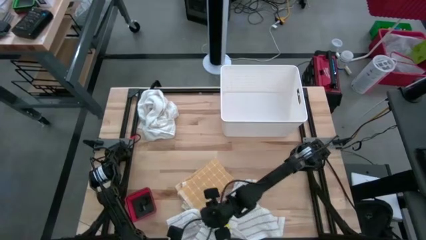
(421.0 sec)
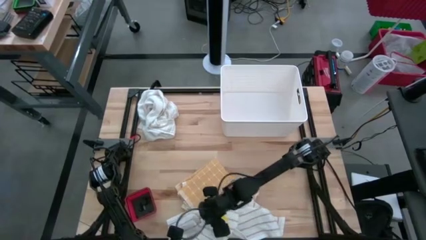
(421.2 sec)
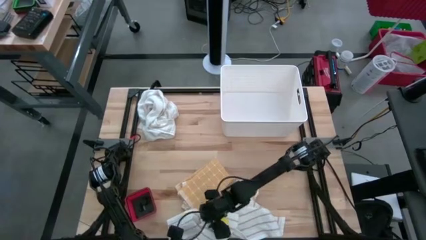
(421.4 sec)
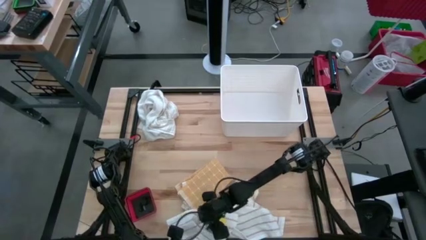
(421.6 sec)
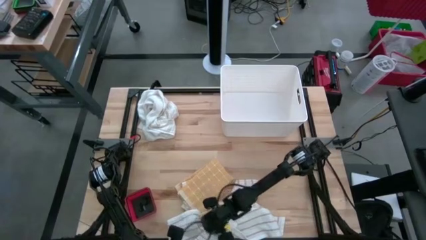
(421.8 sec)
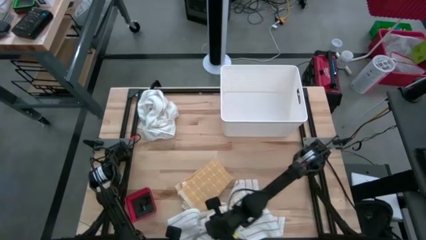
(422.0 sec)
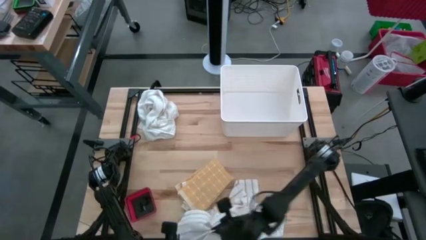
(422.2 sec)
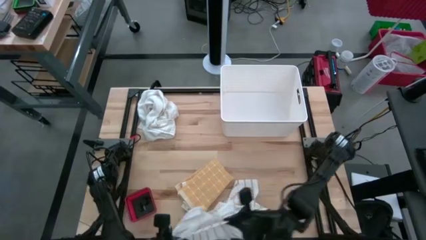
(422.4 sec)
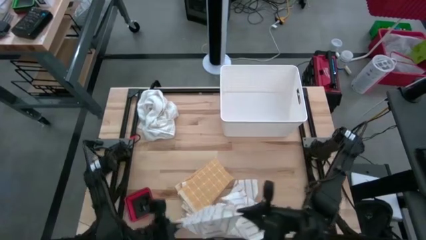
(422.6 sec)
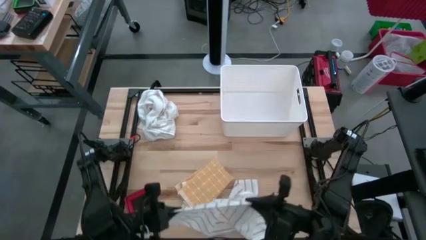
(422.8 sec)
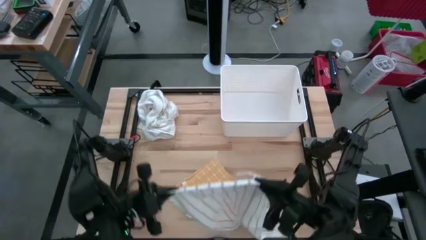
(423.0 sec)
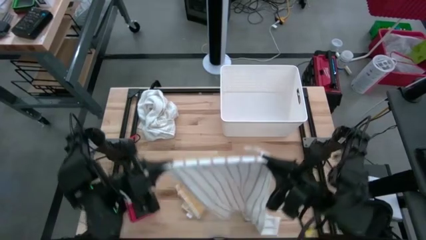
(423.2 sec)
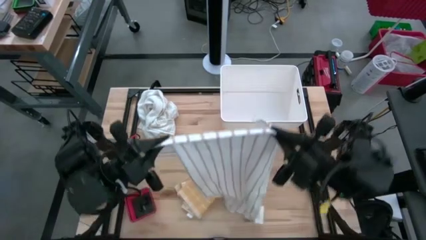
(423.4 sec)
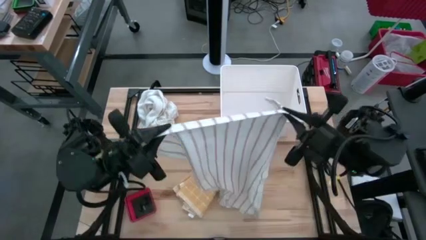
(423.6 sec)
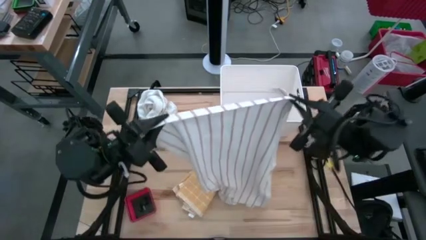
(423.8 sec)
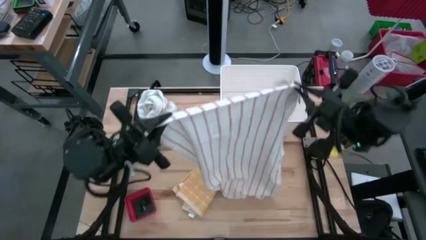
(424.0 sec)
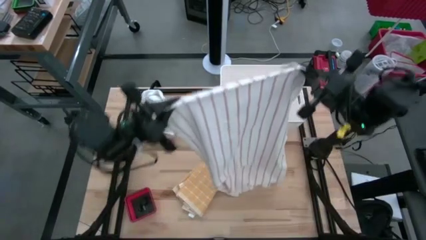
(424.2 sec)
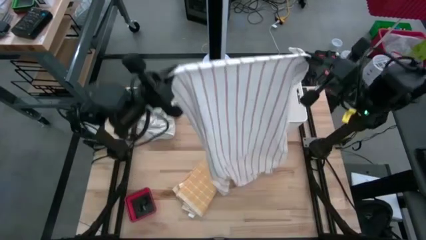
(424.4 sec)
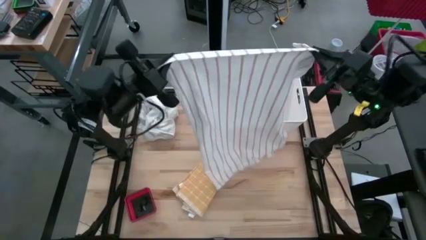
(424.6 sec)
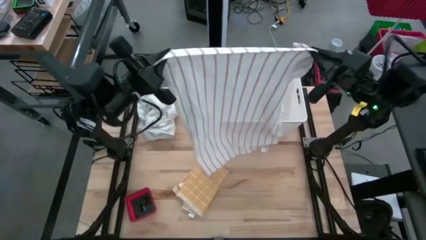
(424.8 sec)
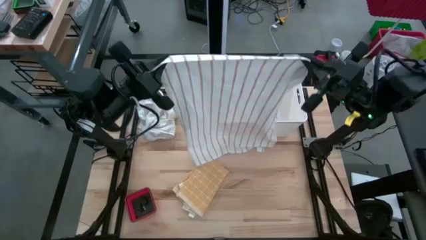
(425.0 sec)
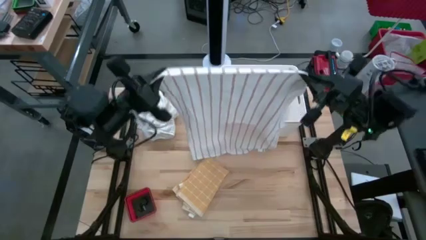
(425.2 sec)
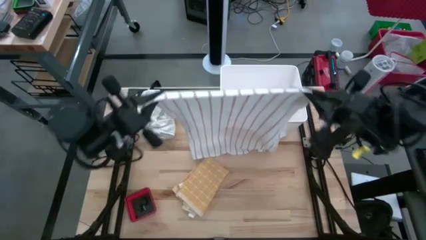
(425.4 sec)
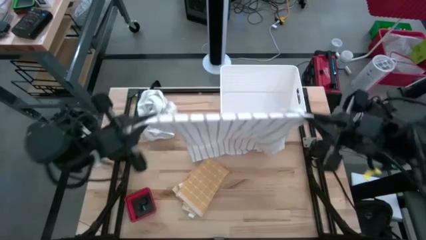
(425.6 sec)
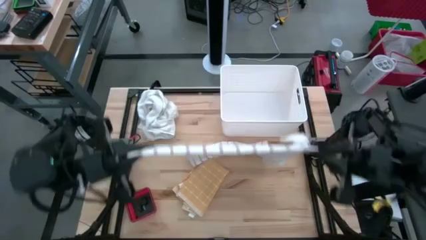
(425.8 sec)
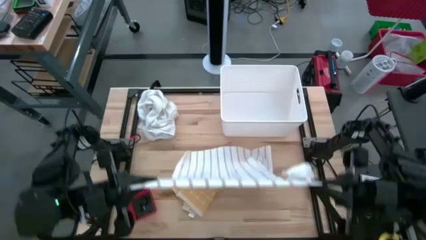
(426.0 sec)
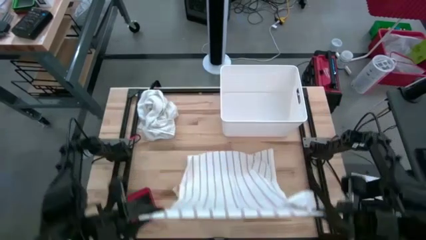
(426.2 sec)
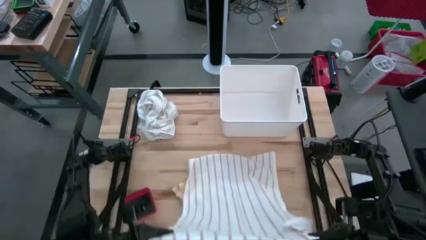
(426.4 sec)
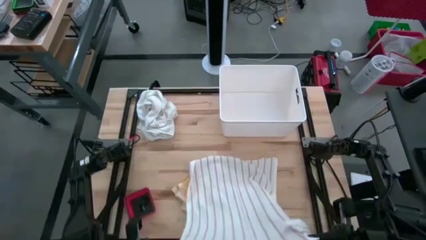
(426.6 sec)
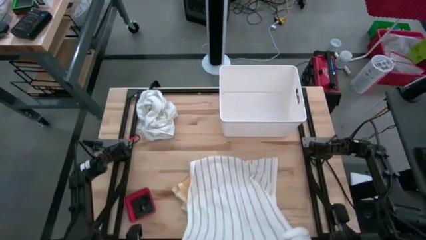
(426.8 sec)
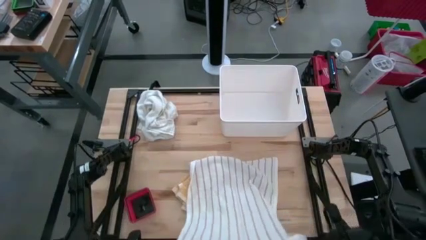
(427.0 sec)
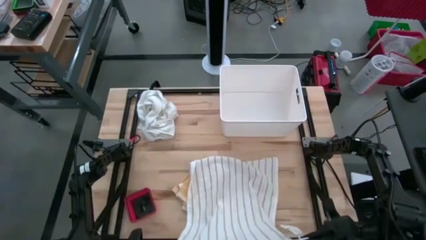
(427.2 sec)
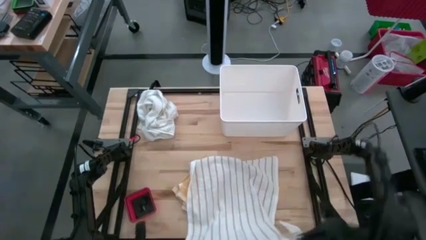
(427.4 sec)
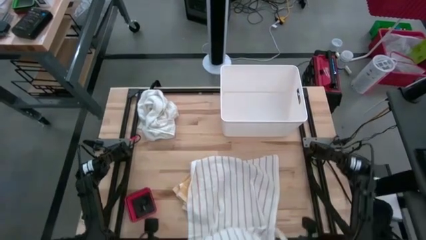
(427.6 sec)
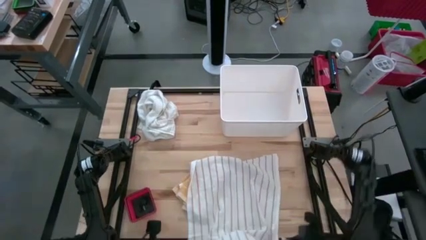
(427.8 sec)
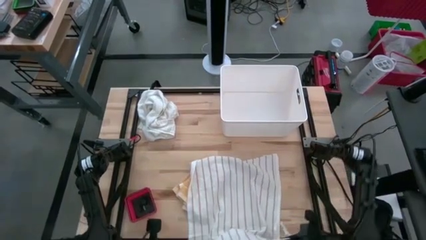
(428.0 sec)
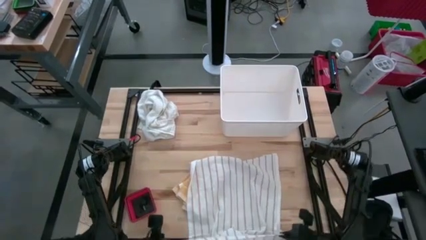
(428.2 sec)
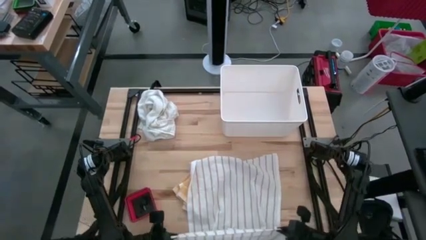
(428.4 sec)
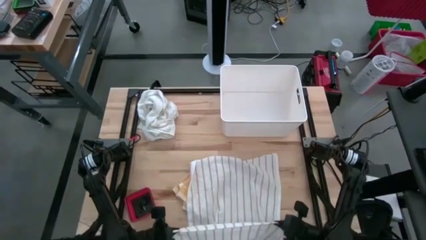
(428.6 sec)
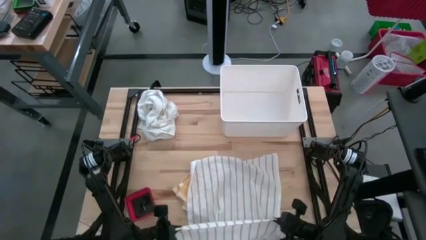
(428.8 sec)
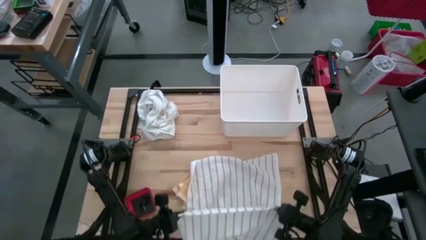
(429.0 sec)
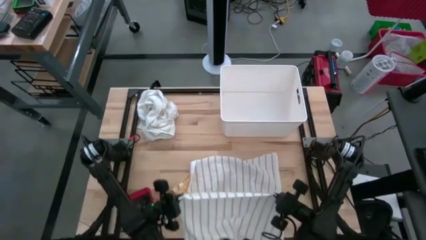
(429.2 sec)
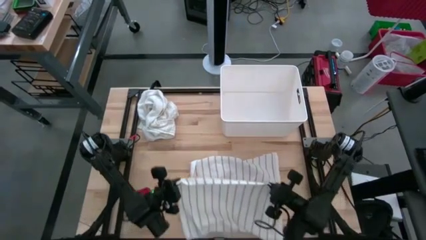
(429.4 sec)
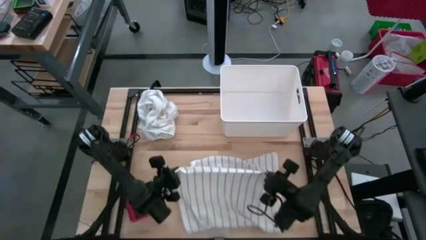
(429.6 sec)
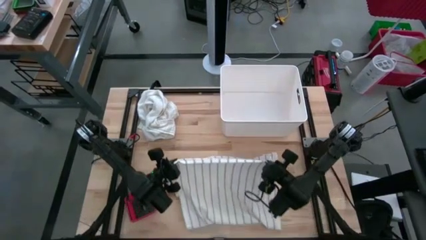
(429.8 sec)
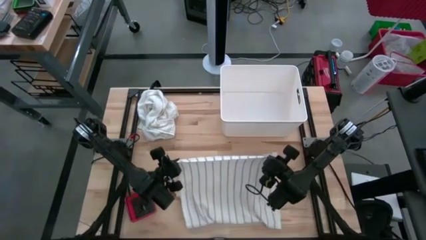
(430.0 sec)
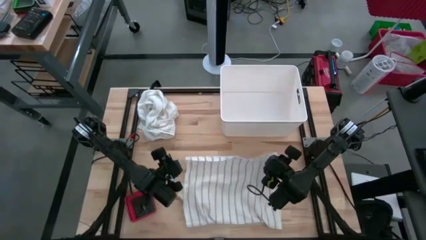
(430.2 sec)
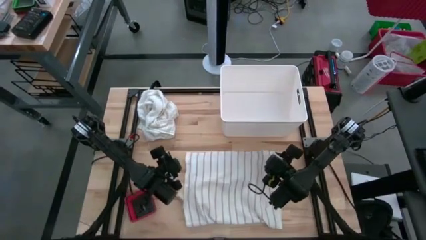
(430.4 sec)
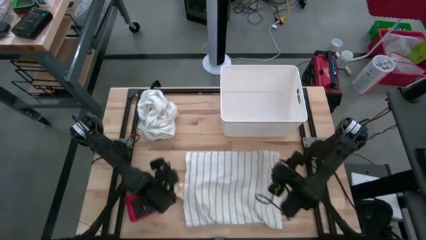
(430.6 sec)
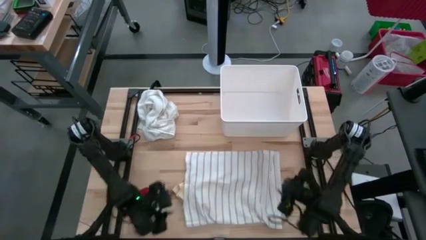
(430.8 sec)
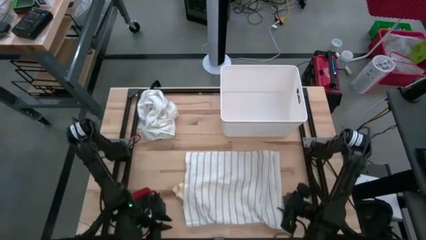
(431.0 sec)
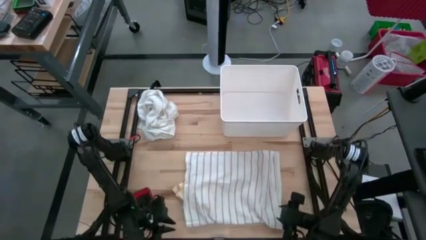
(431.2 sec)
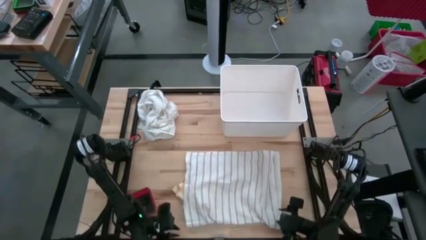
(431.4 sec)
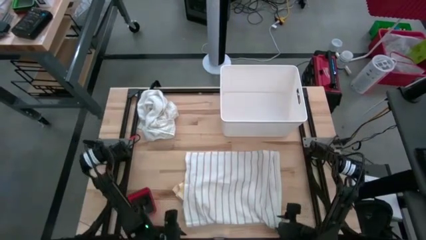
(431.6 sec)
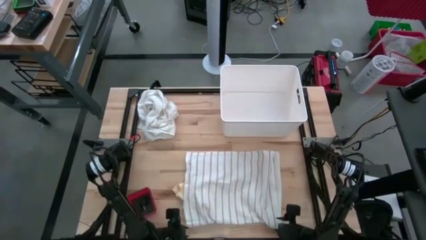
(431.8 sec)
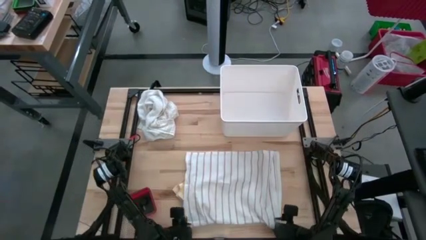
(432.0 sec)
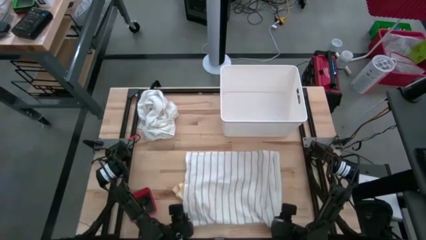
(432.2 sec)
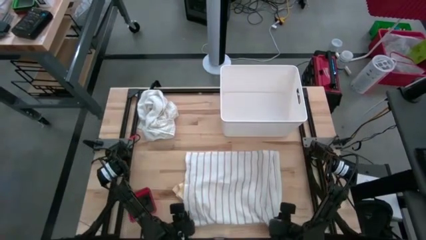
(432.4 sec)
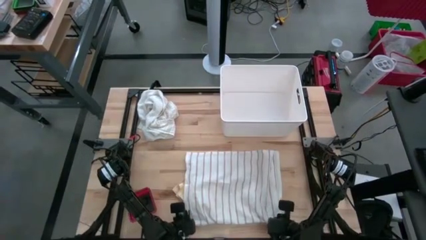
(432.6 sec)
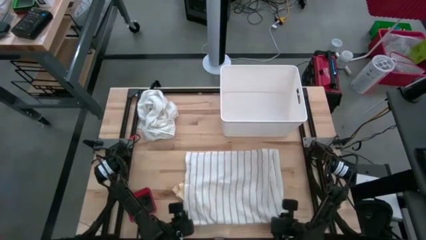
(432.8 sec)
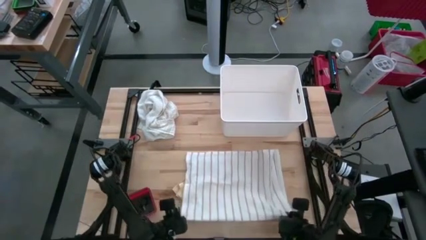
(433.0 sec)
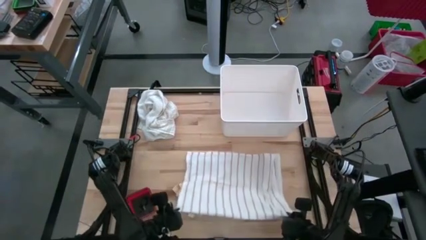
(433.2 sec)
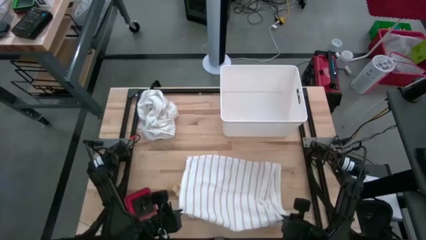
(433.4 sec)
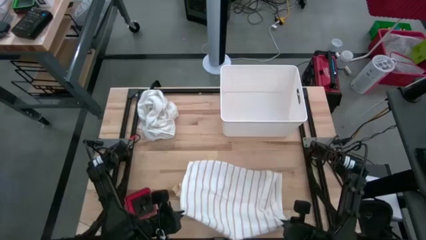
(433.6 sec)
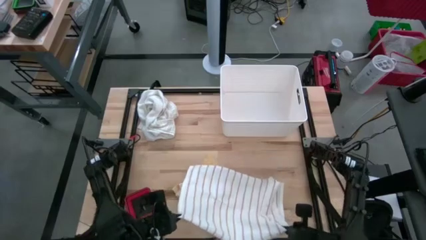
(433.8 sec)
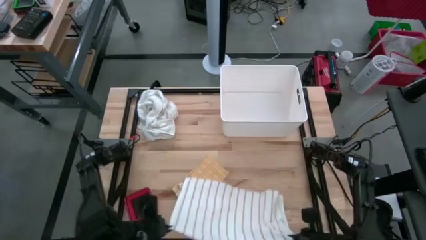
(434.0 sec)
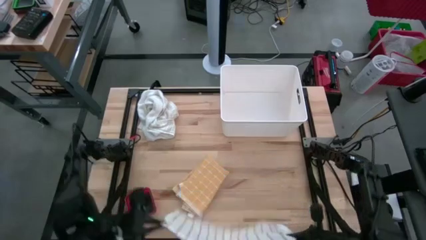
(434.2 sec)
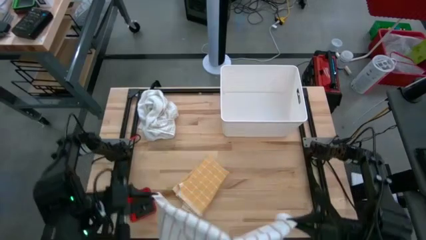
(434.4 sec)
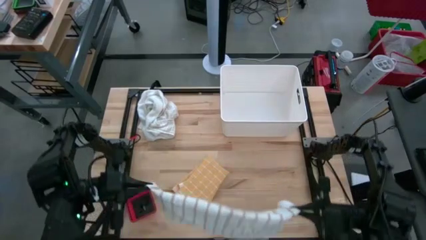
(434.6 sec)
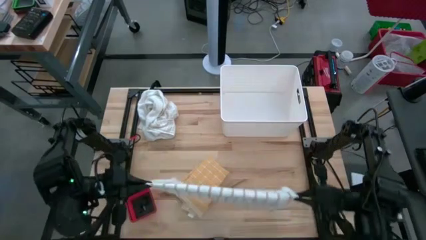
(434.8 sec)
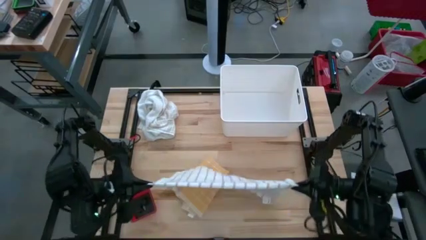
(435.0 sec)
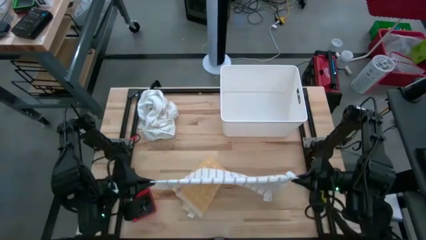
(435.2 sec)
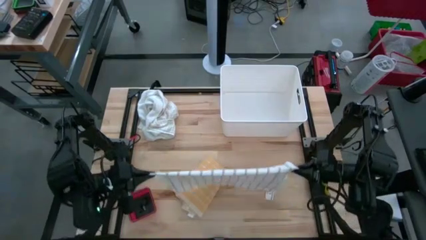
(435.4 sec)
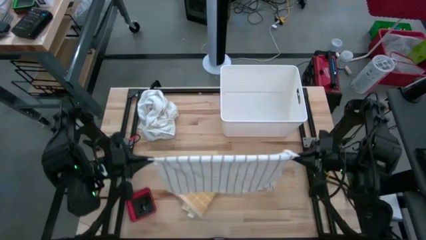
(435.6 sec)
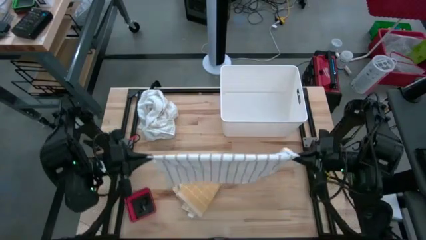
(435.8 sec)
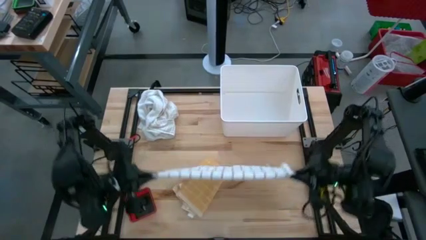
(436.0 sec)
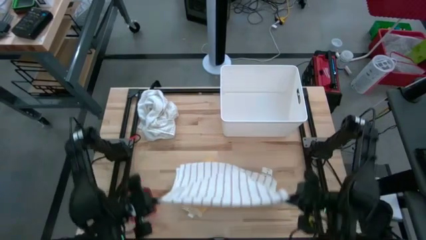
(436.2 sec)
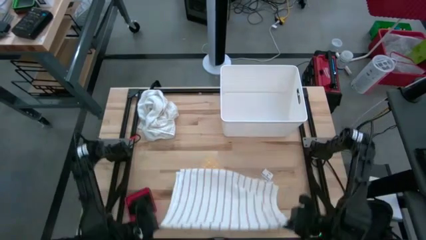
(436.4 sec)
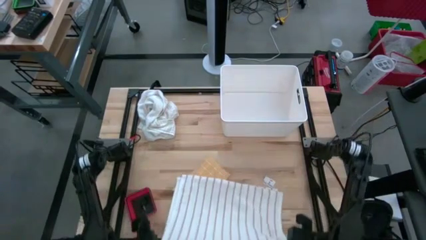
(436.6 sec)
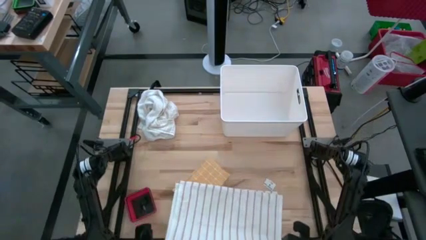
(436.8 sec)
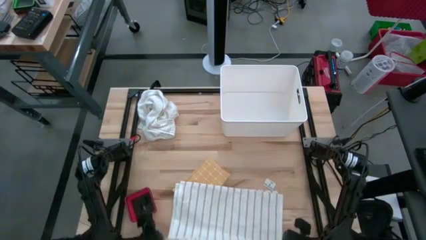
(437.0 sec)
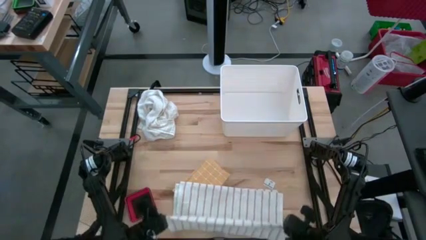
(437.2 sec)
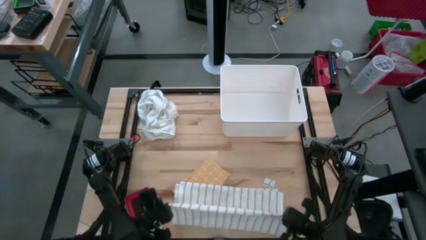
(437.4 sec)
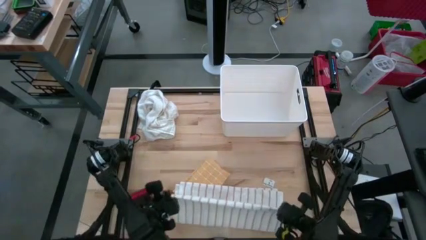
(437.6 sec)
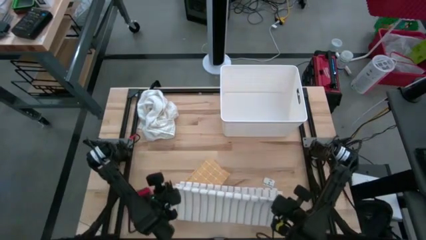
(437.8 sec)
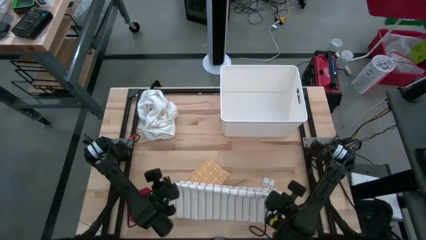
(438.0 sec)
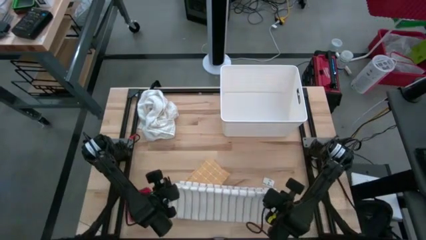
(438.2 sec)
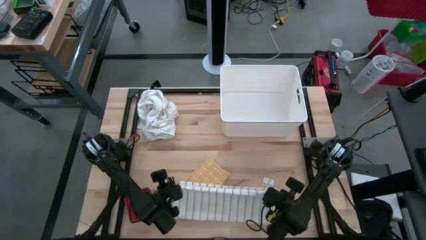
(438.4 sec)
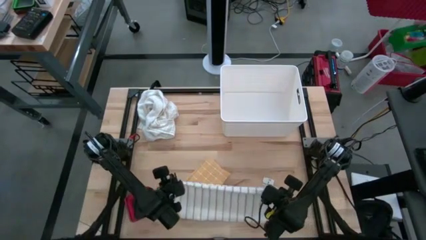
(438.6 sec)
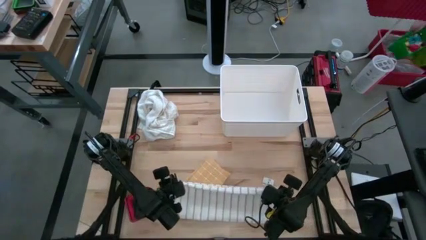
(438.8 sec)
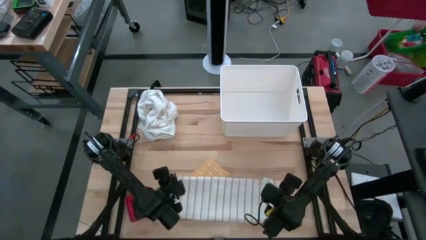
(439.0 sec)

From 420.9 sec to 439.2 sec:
Task: Fold towel
Fold the white kitchen towel
